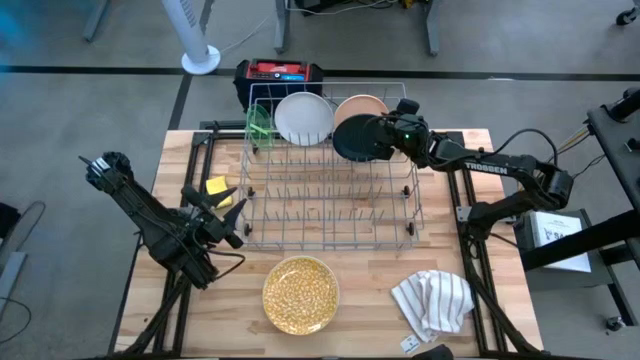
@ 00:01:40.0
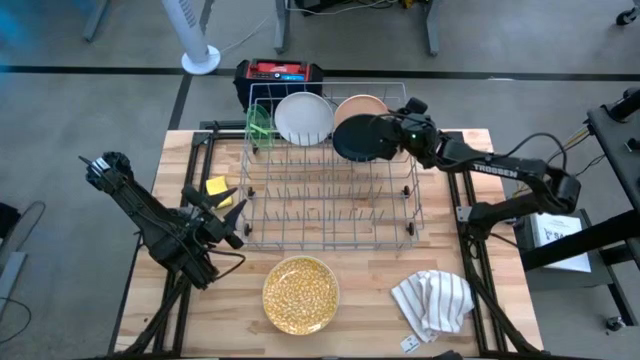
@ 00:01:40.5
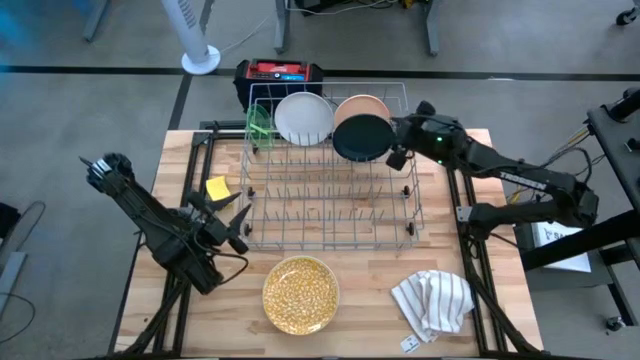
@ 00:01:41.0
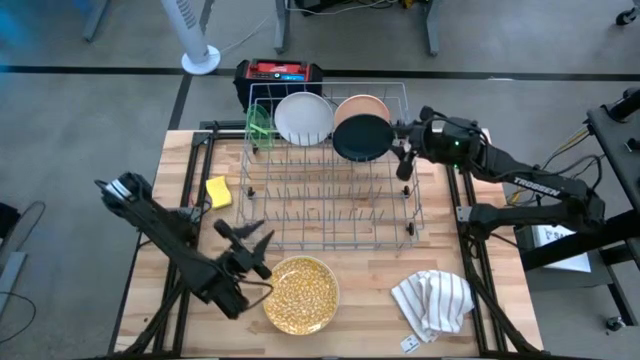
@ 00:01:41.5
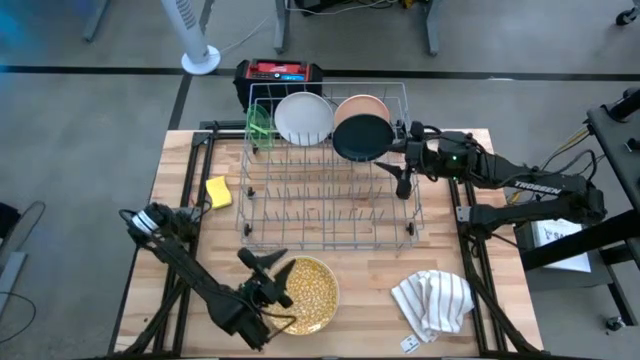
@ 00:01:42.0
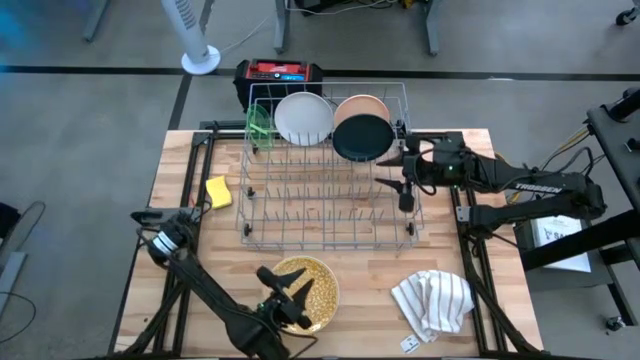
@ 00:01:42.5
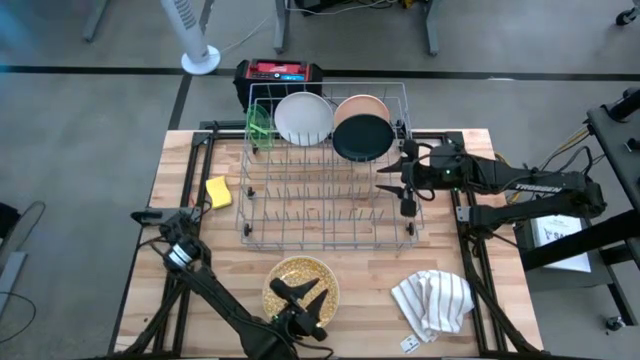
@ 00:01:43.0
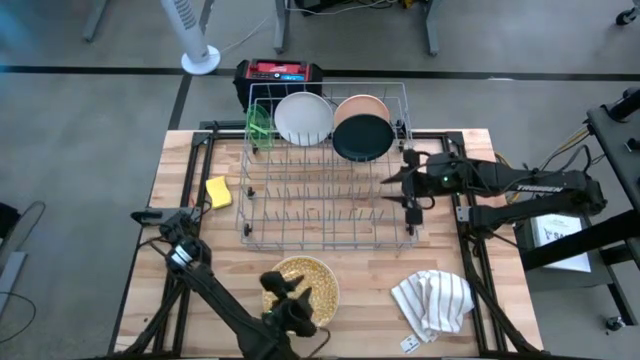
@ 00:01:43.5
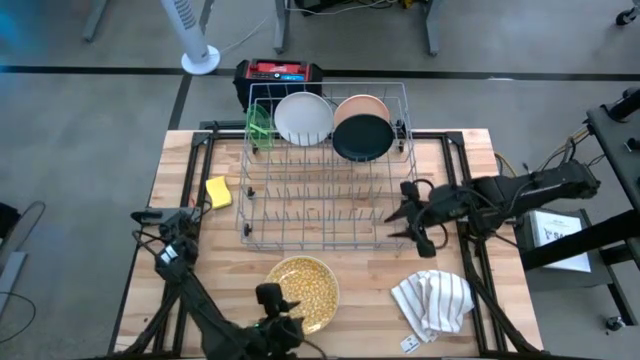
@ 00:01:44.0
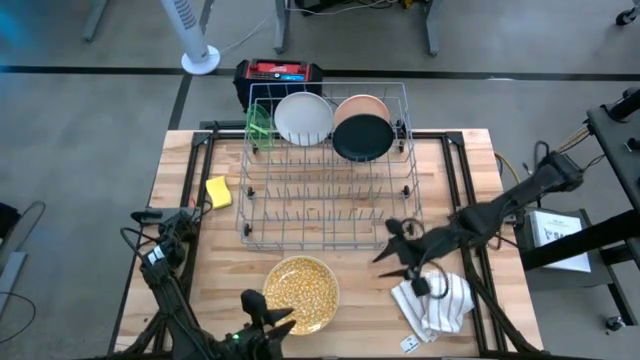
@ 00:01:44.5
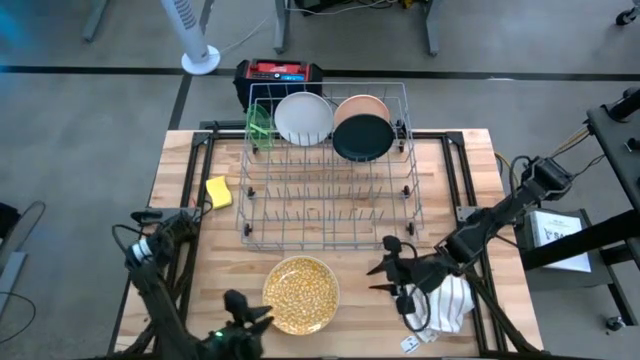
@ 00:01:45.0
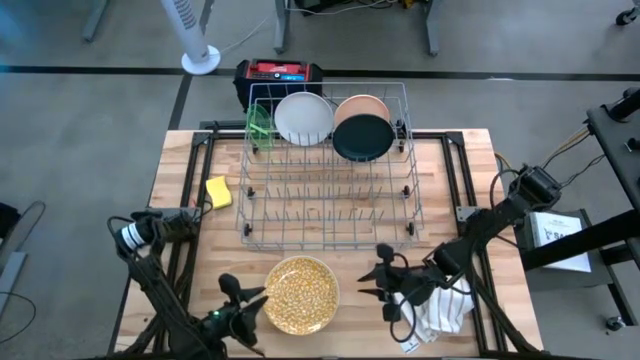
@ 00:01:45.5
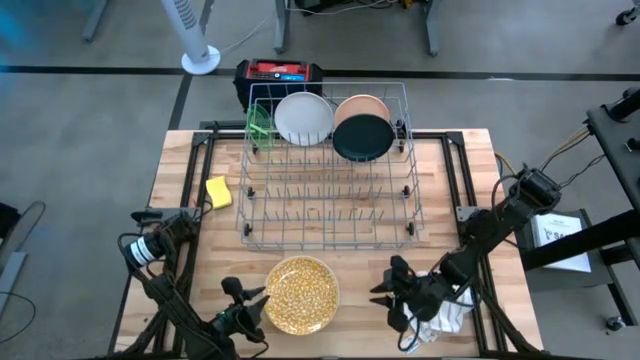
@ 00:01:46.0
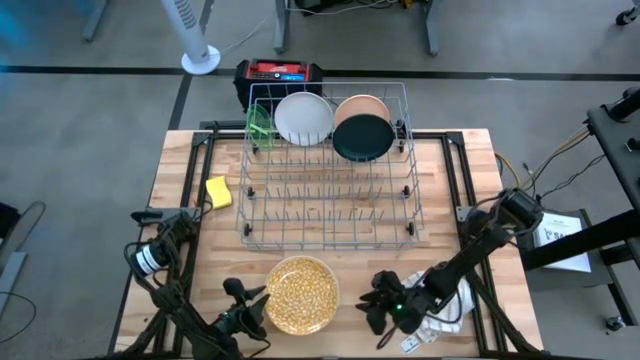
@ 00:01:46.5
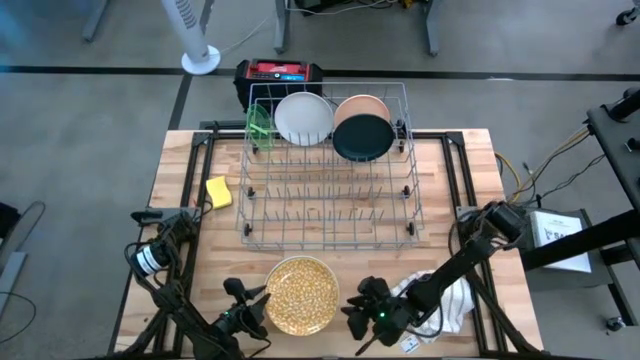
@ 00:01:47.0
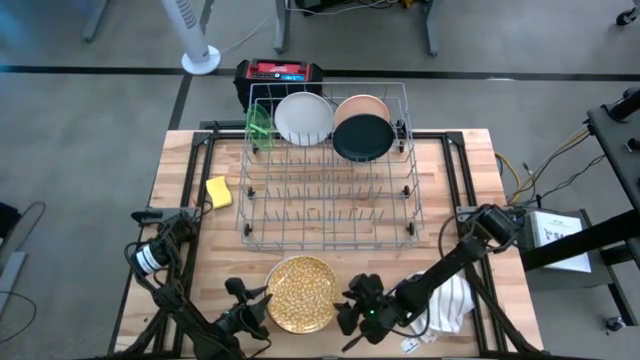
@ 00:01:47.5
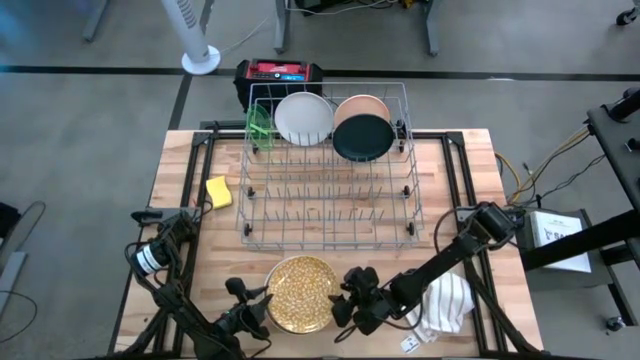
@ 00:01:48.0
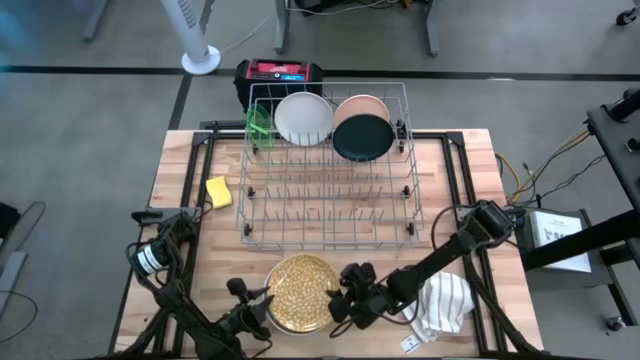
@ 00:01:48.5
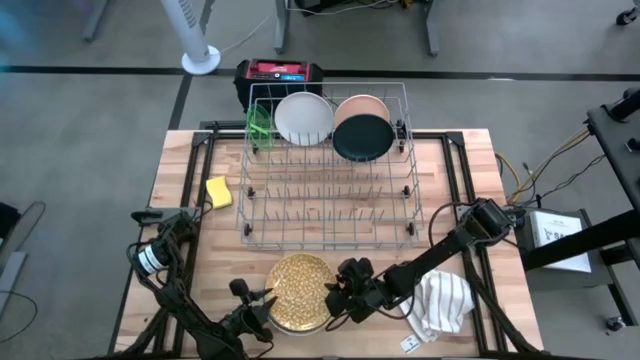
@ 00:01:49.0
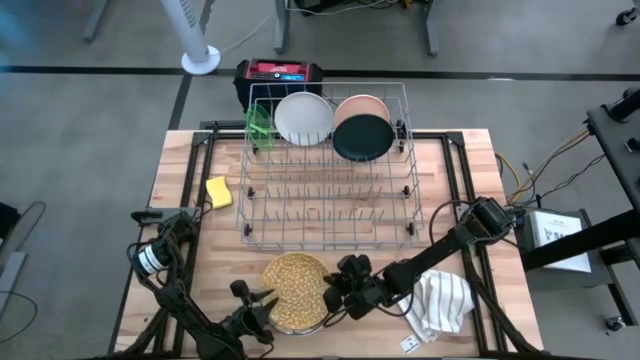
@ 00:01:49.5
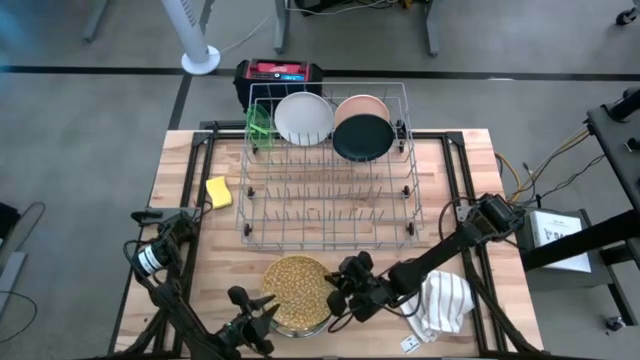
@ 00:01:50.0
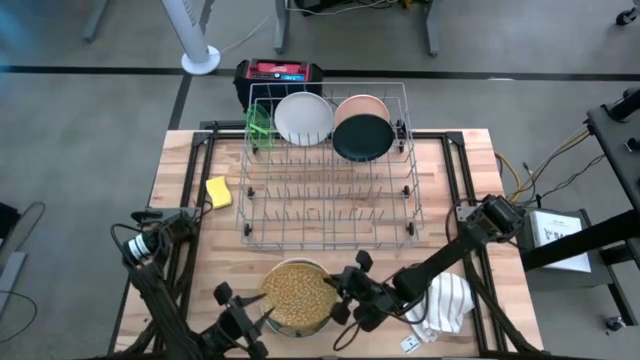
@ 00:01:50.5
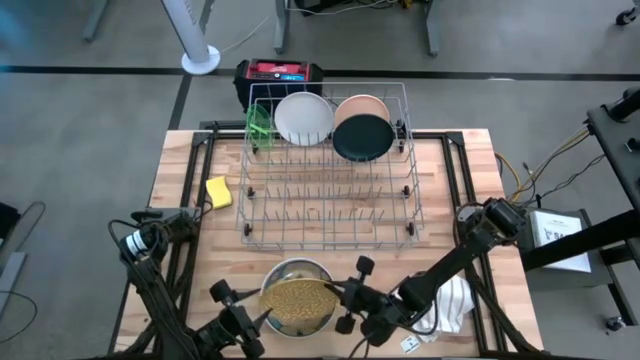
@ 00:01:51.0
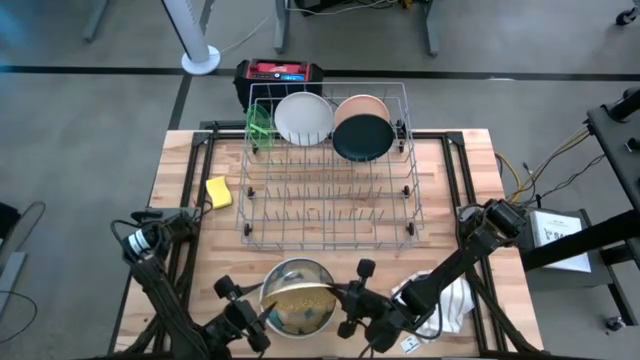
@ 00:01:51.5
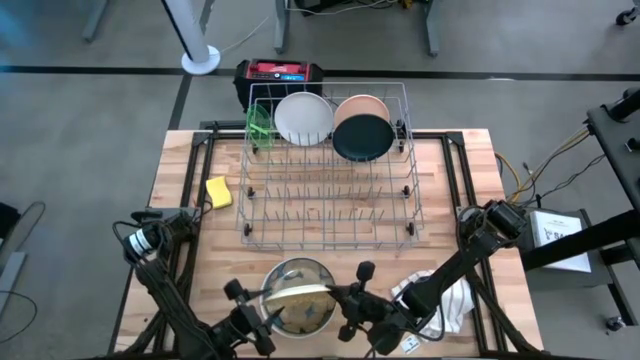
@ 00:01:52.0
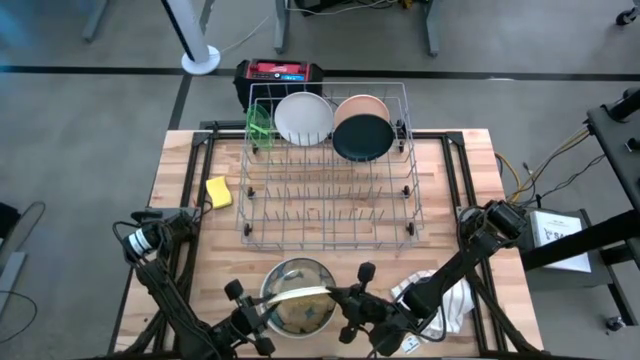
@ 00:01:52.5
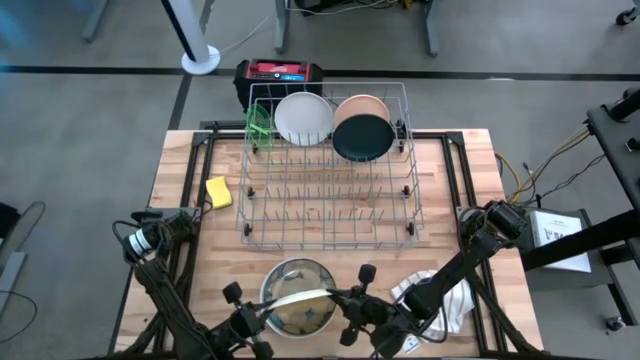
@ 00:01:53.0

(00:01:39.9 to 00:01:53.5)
Task: Sort dishes
Put the yellow plate into the dish rack

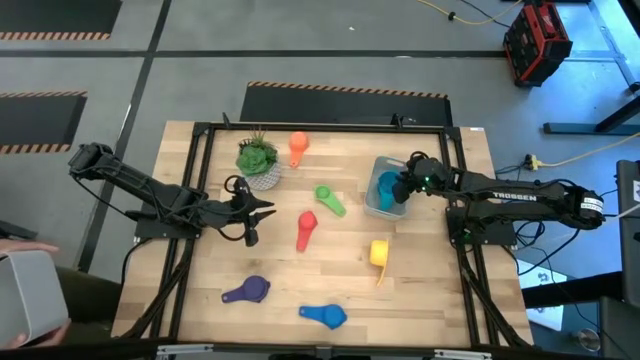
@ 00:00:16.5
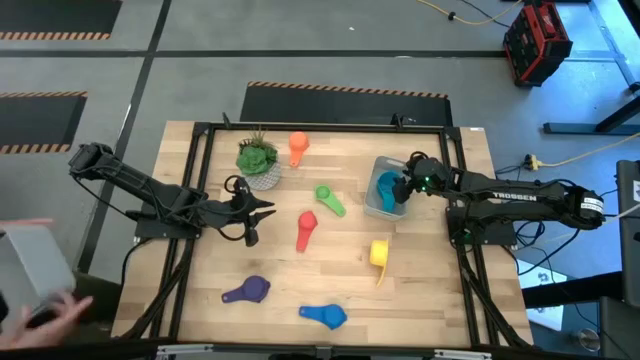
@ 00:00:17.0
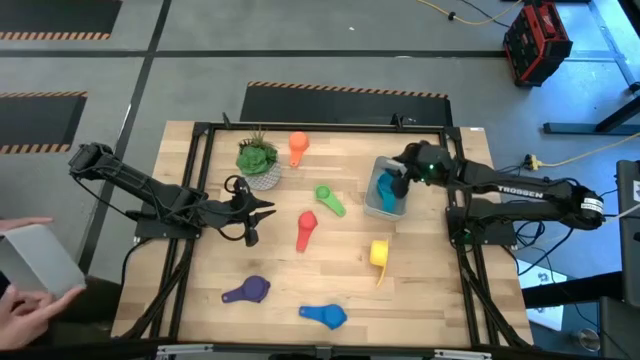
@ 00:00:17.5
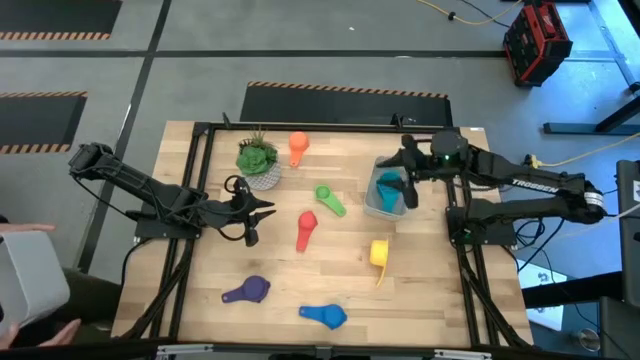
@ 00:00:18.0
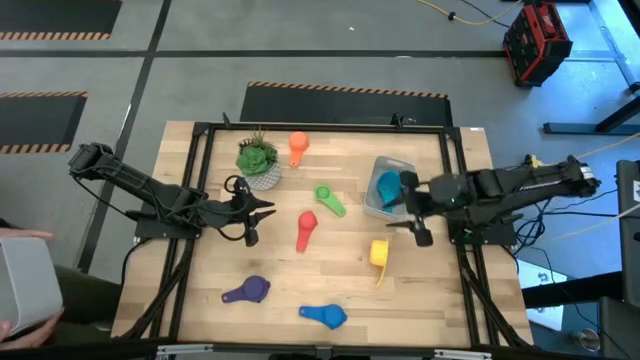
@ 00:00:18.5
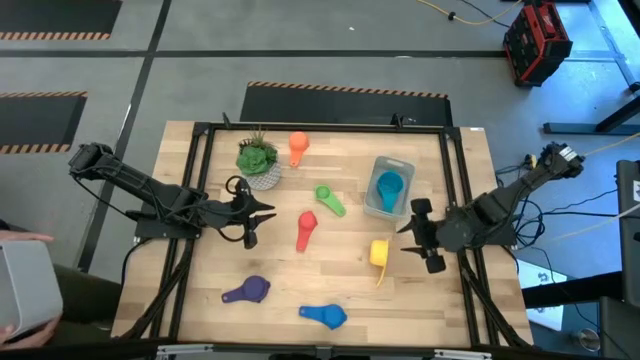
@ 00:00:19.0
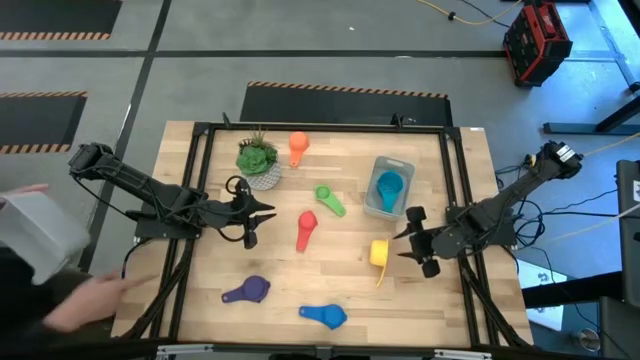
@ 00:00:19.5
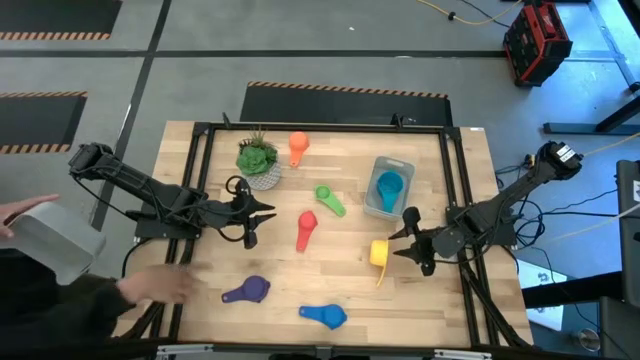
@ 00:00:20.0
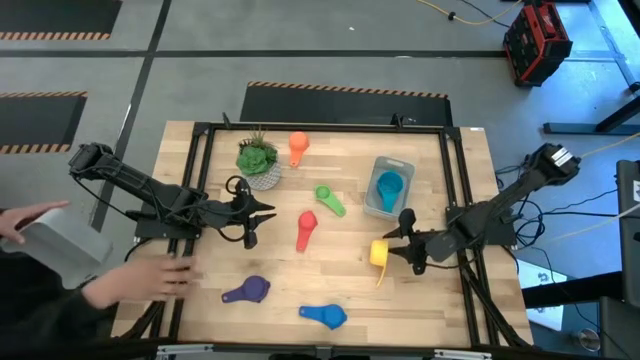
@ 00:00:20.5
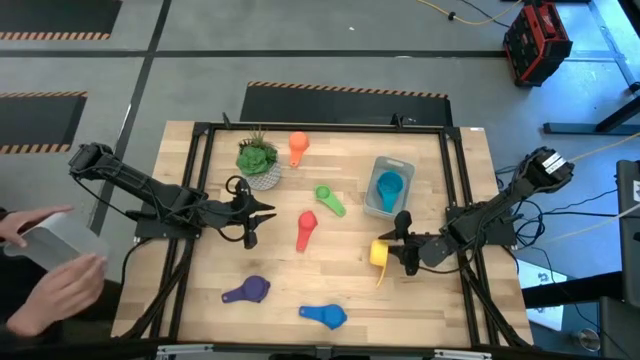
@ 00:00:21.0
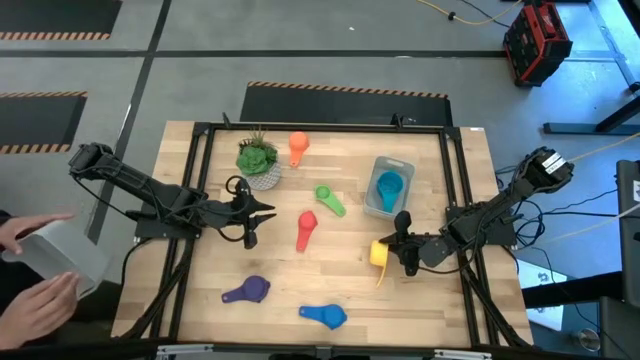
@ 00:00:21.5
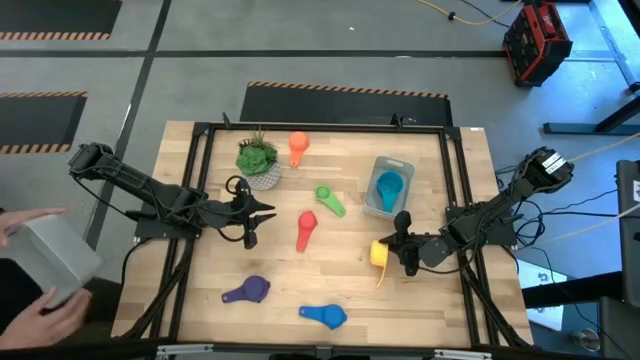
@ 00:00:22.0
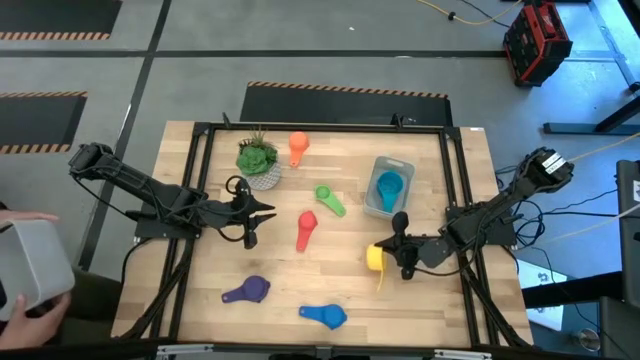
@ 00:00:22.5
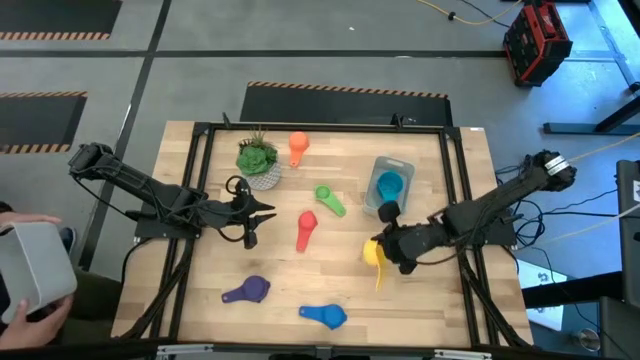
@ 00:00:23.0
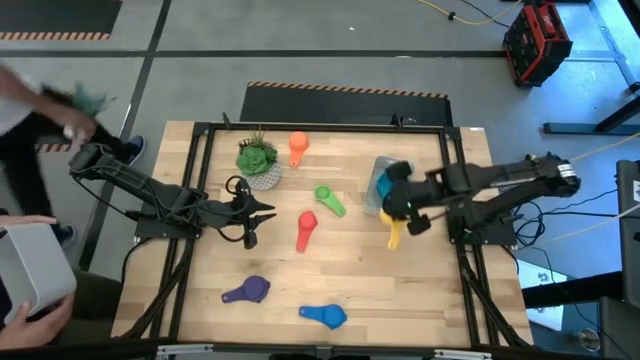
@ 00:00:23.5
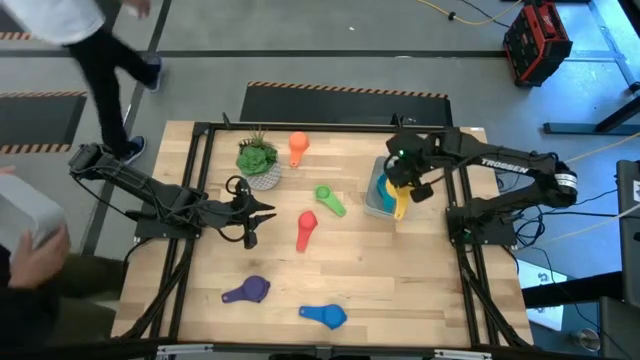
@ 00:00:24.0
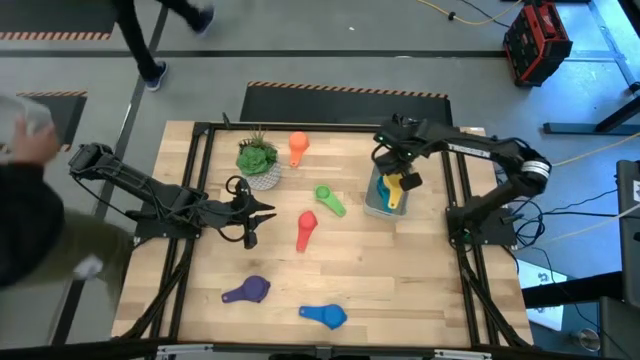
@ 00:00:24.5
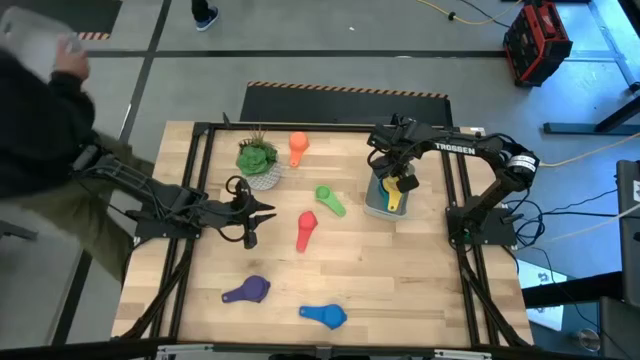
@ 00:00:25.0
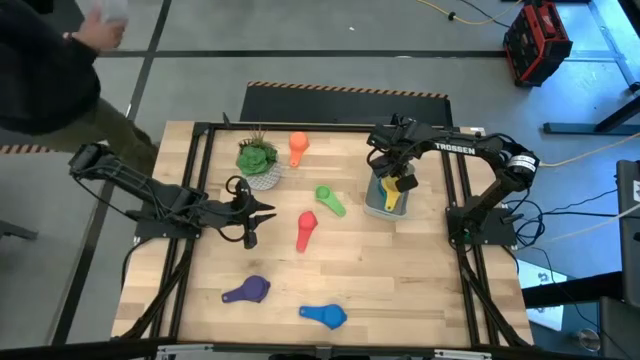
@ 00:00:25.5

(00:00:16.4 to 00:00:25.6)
Task: Nest measuring cups in basket
Stack the yellow measuring cup on top of the light blue measuring cup in the gray bin
